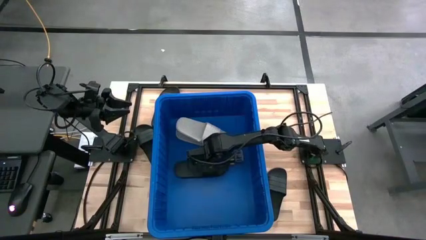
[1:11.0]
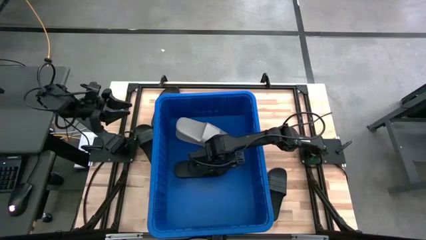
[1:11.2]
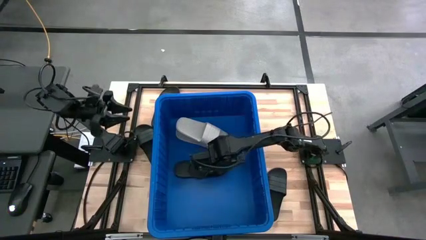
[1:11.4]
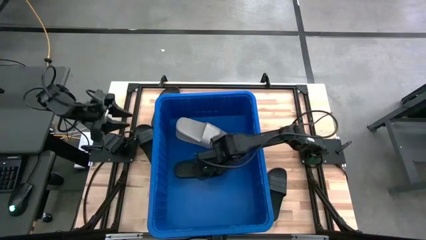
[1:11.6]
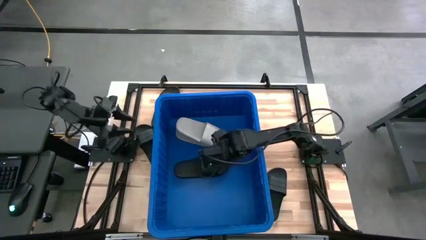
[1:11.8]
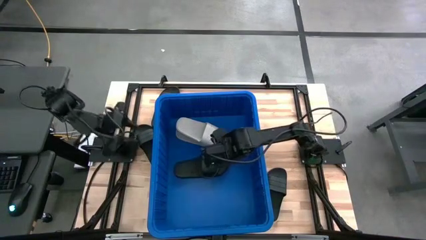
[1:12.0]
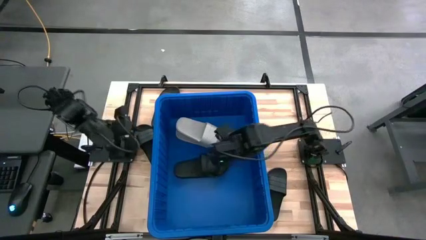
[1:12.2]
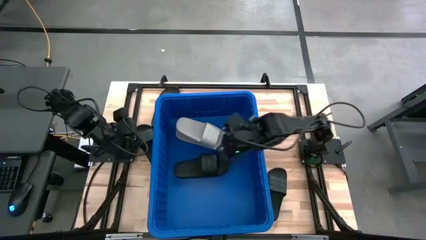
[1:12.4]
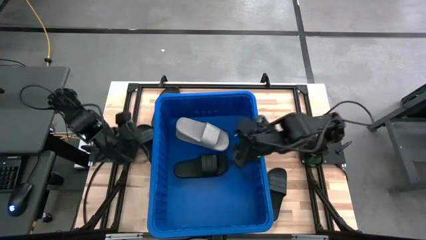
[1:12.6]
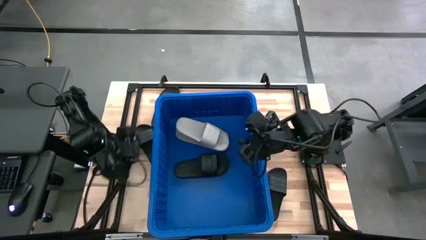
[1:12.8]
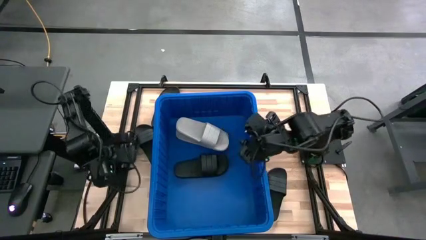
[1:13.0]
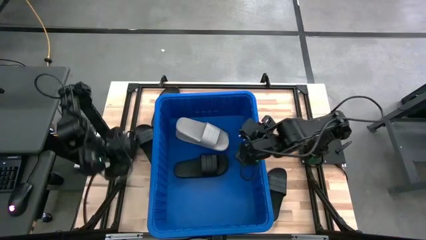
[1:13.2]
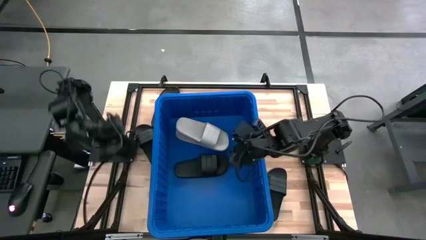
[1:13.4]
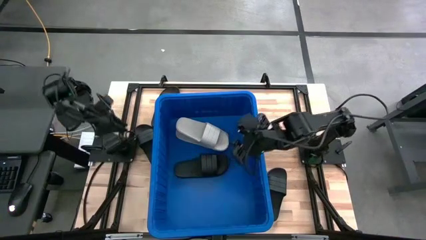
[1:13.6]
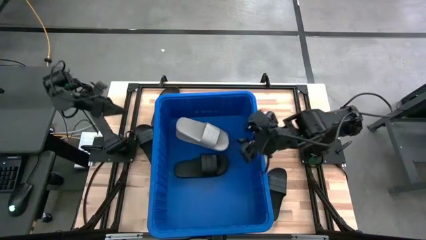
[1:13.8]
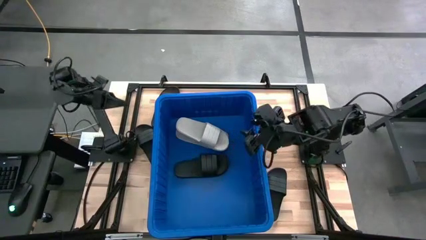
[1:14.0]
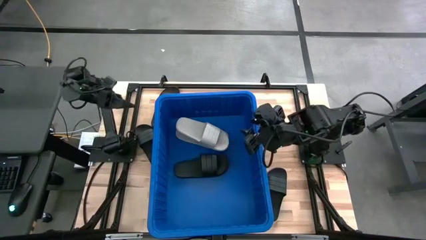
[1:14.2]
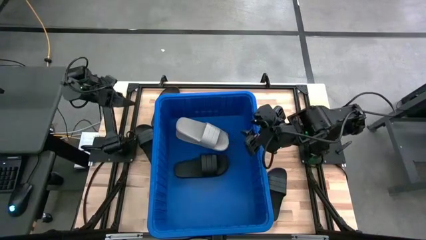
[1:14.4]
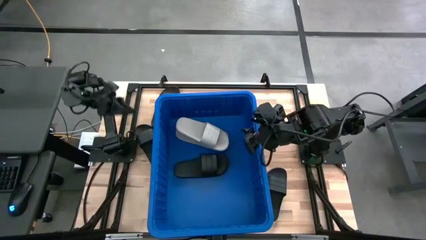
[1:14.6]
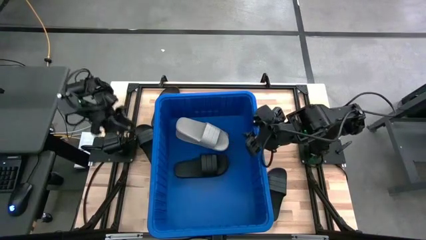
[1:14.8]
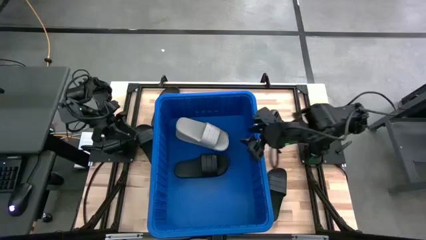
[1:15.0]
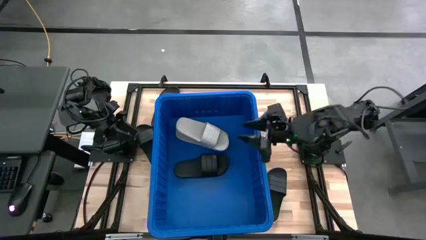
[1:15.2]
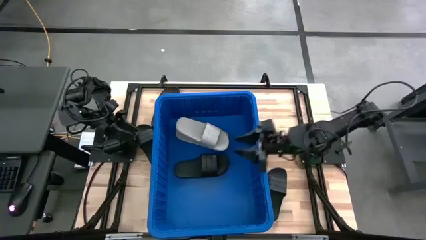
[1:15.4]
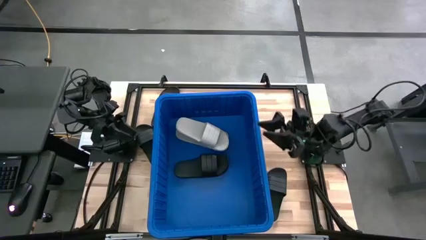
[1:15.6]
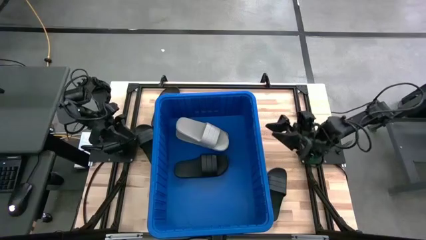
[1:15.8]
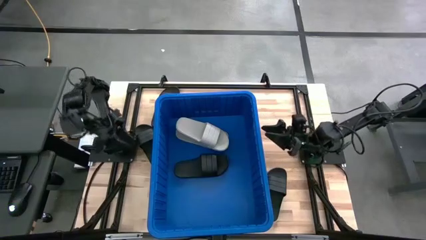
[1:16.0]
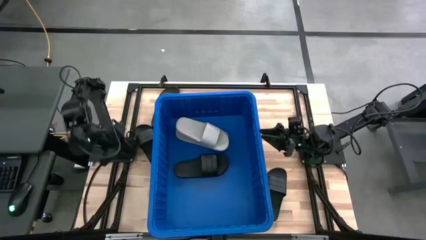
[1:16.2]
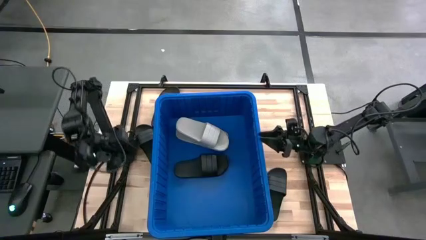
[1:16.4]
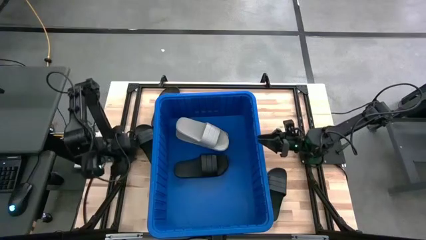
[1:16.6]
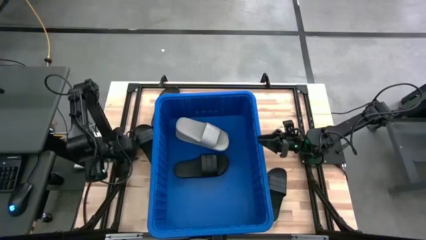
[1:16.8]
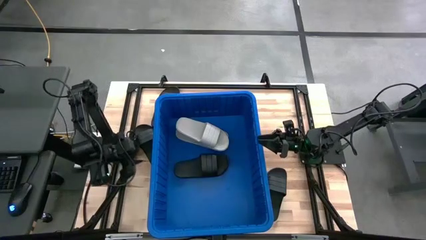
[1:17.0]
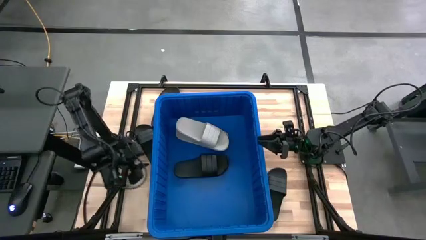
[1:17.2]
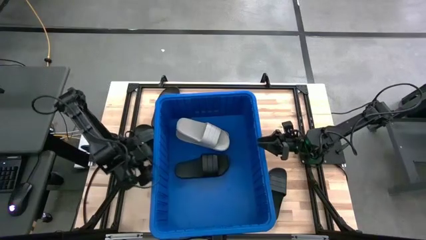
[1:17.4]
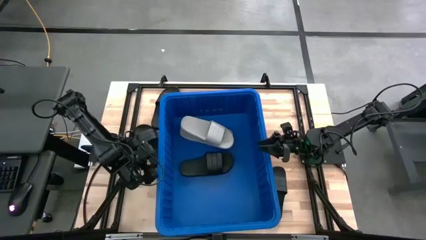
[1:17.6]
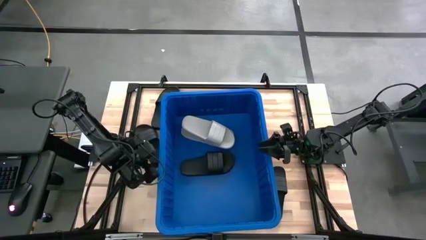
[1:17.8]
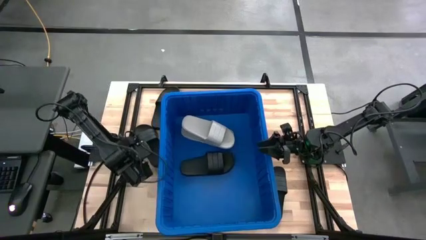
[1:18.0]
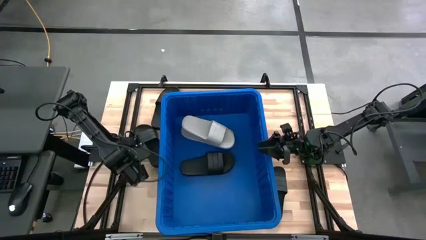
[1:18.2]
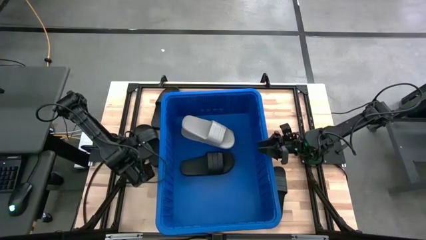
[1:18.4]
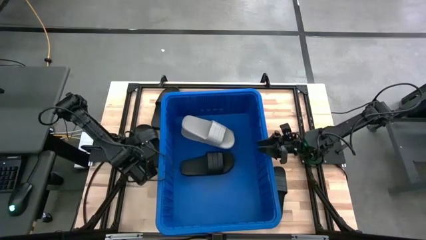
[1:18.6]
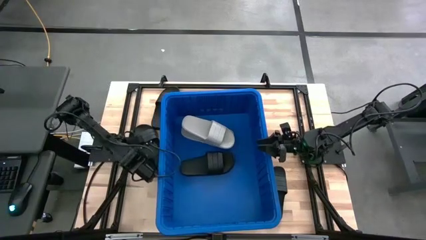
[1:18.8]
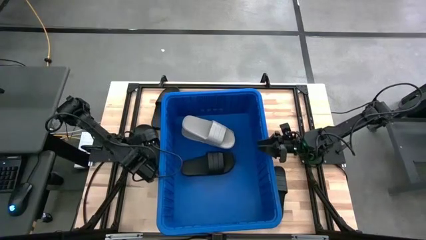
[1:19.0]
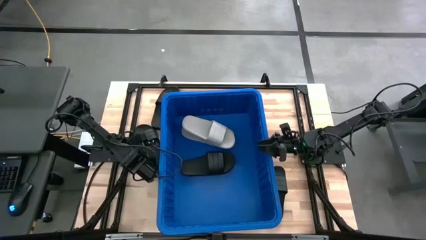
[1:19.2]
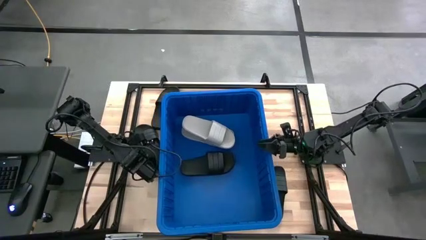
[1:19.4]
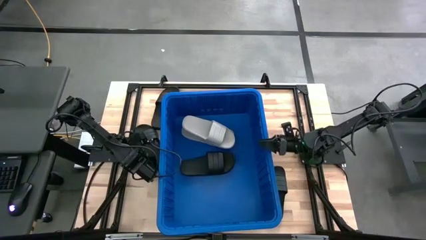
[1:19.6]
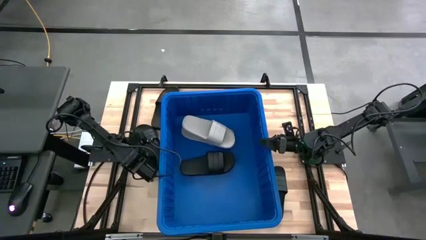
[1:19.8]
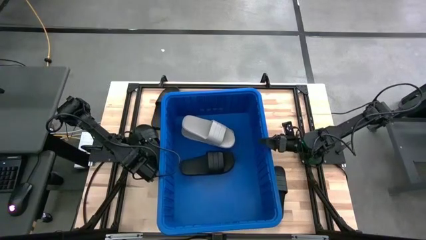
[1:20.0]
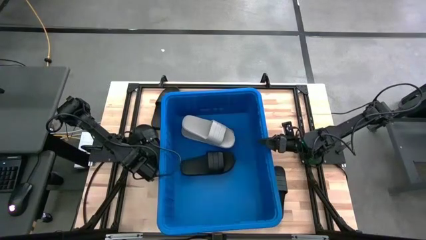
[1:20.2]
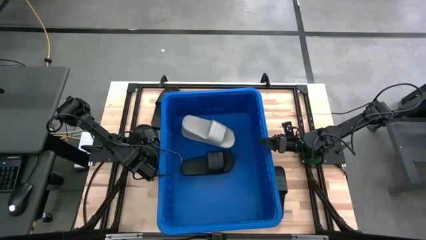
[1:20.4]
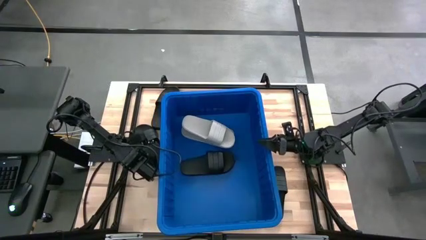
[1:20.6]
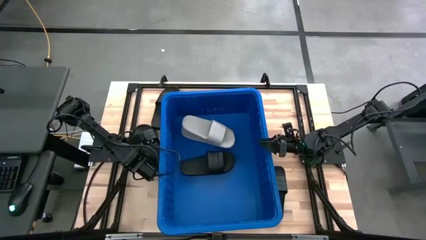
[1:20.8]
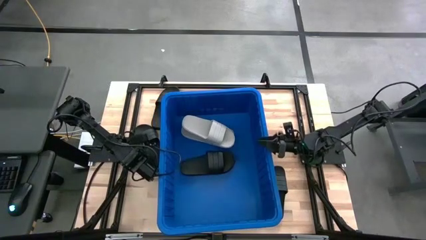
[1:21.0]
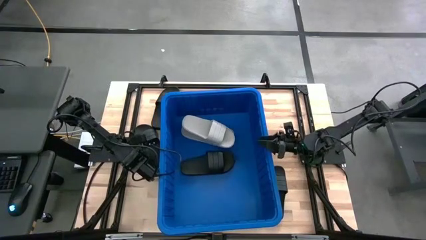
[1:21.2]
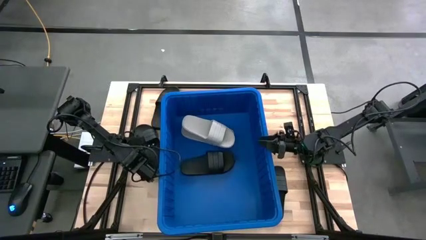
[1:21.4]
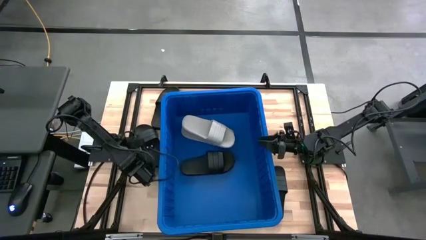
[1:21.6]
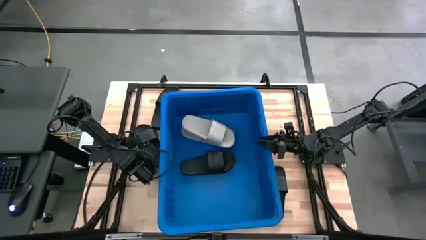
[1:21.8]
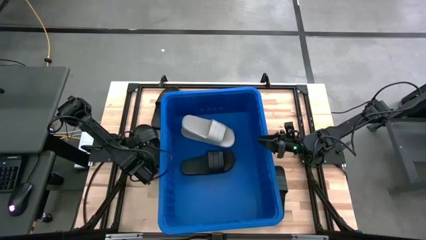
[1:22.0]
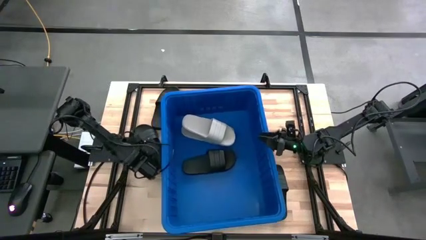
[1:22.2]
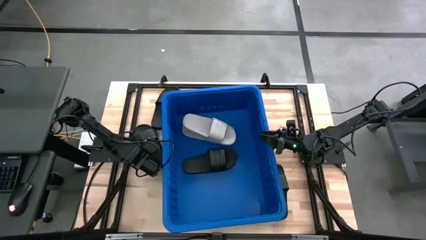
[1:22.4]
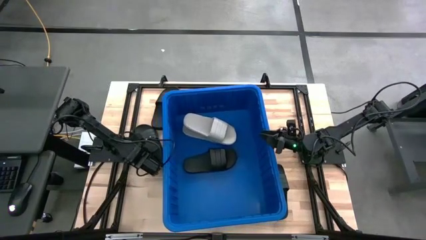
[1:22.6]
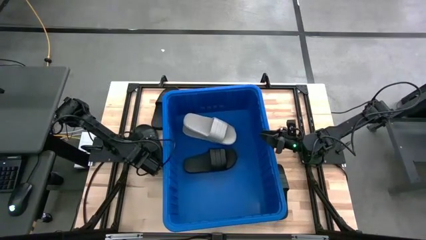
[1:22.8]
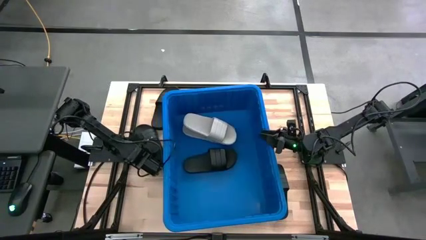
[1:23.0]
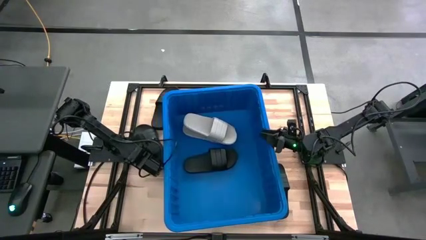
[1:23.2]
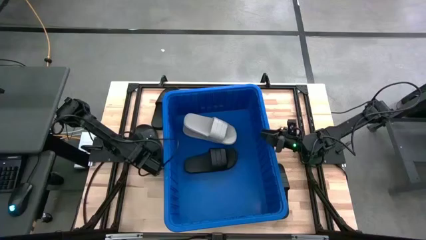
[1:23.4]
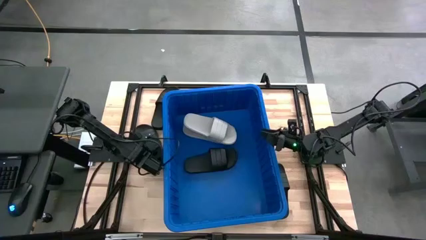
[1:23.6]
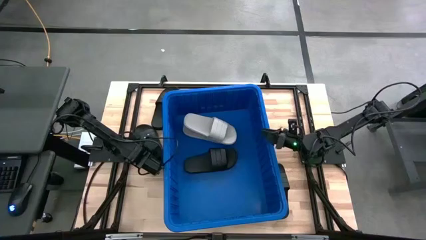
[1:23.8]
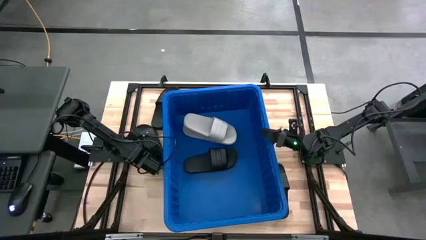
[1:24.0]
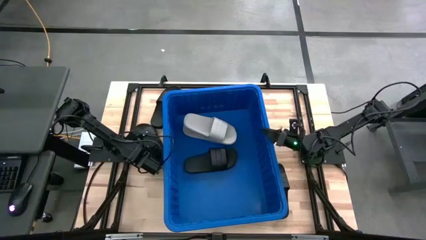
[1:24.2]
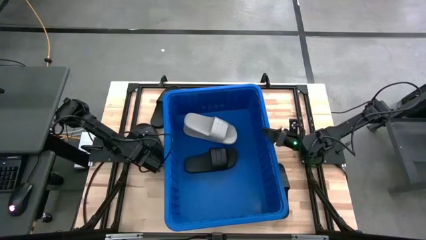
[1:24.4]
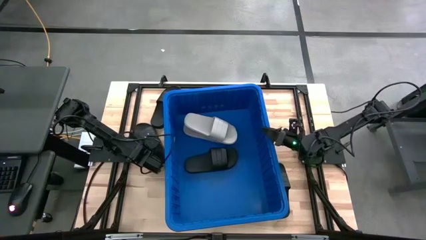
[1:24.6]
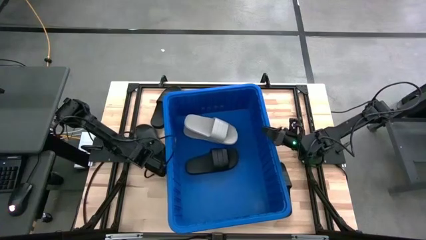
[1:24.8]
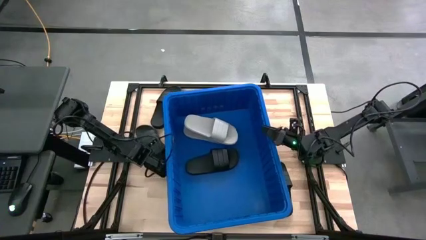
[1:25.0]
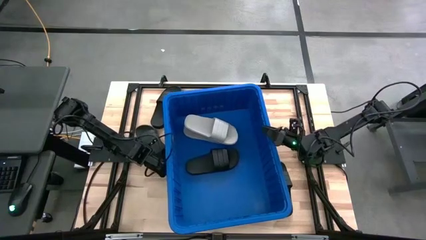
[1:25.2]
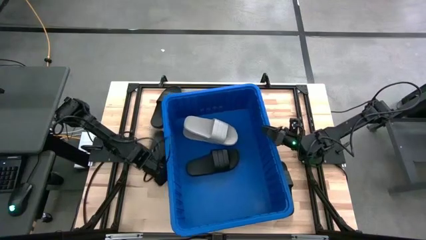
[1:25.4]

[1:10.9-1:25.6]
Task: Pick and place slides into bin
Put the black slide into the blue bin
